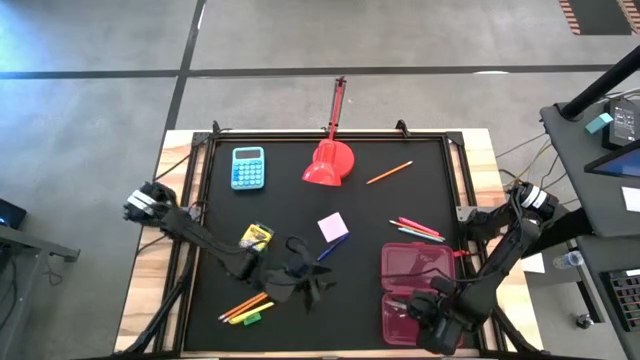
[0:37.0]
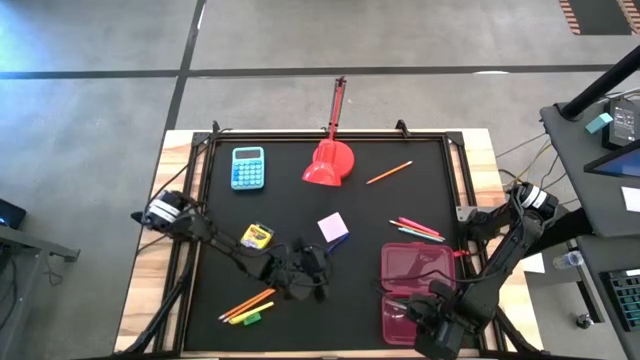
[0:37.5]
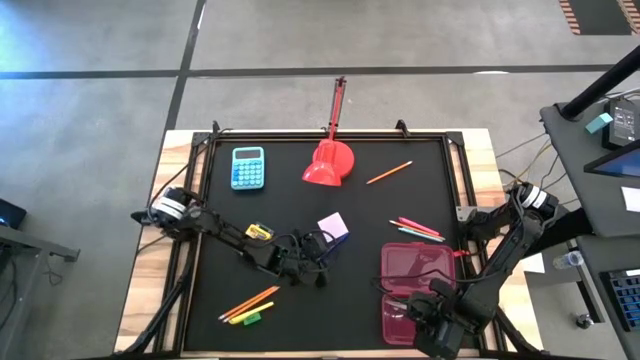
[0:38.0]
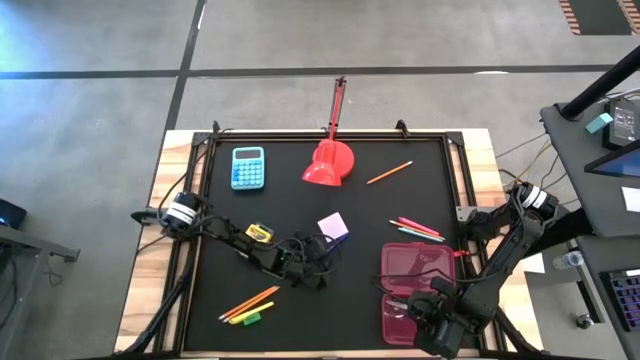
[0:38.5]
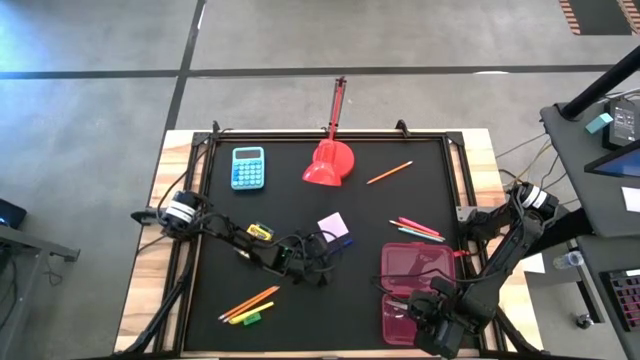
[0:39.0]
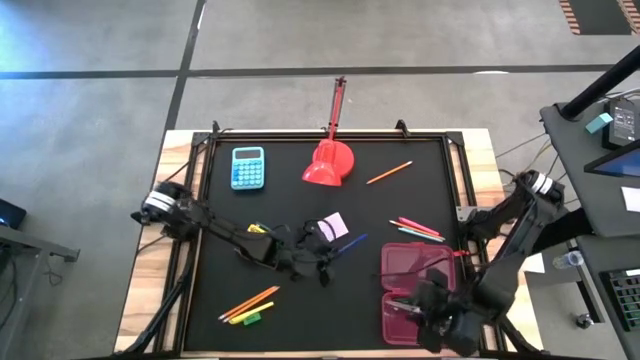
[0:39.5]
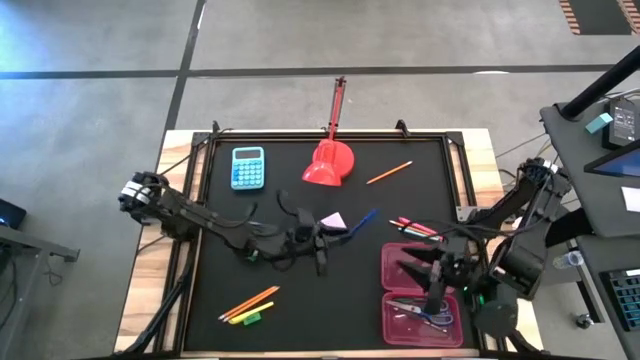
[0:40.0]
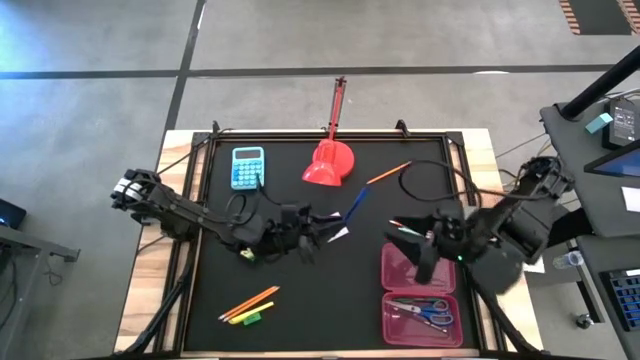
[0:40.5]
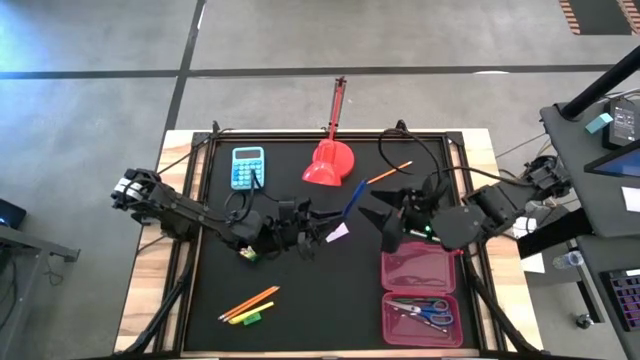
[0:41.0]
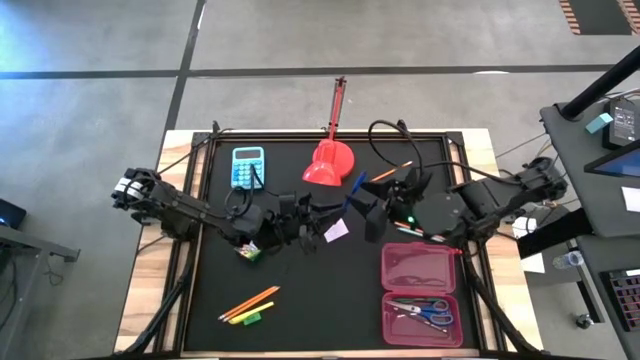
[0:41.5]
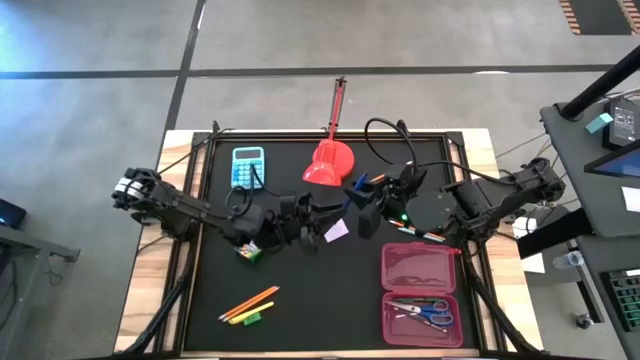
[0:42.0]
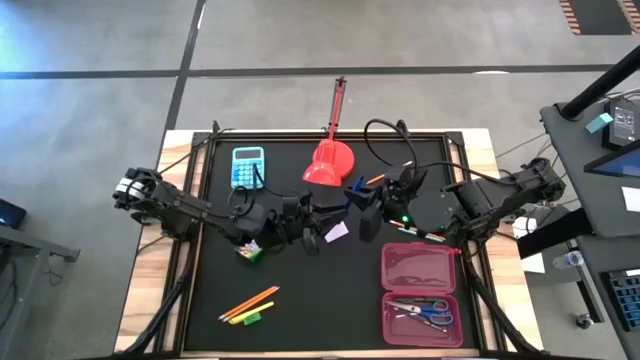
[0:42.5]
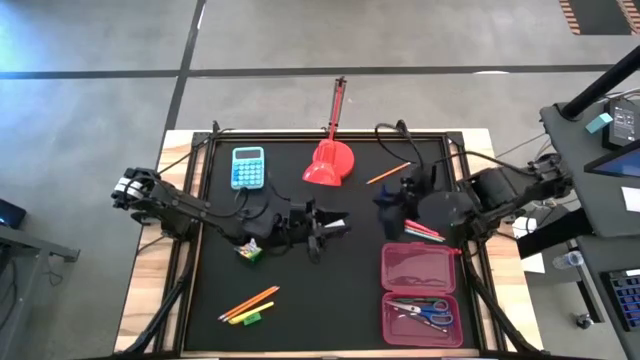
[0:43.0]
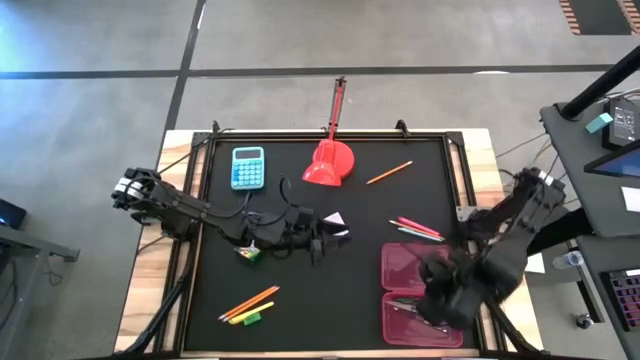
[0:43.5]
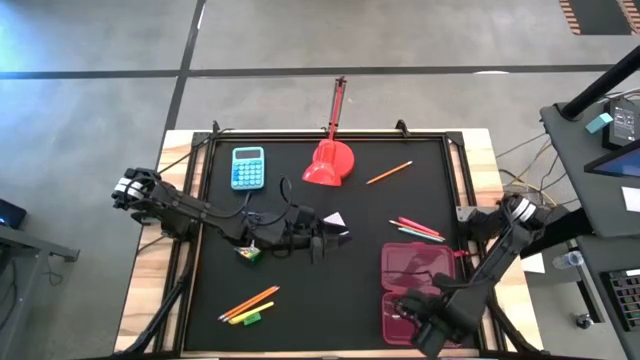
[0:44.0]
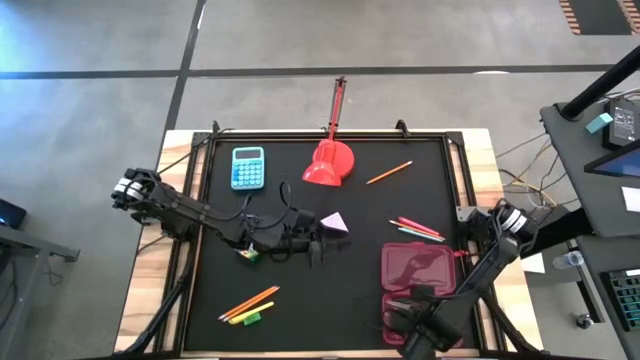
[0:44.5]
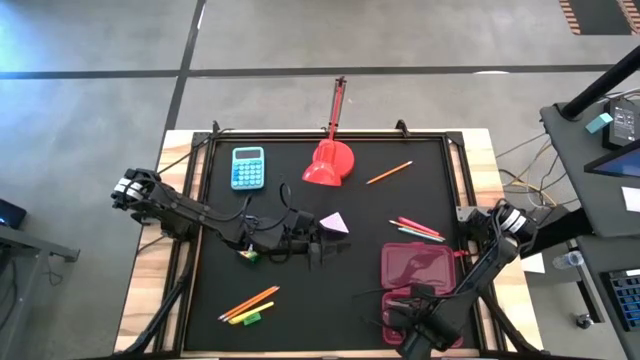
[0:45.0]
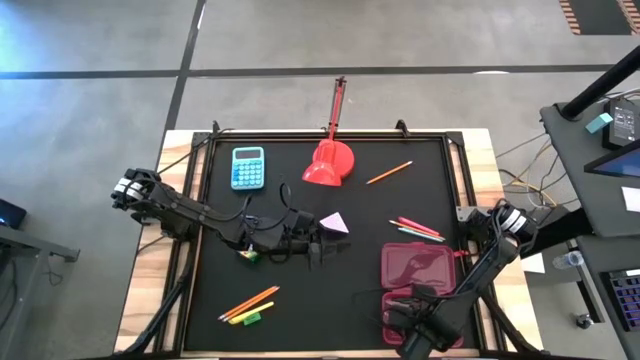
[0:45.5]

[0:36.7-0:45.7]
Task: Pack school essentials
Put the blue pen into the pink supply box

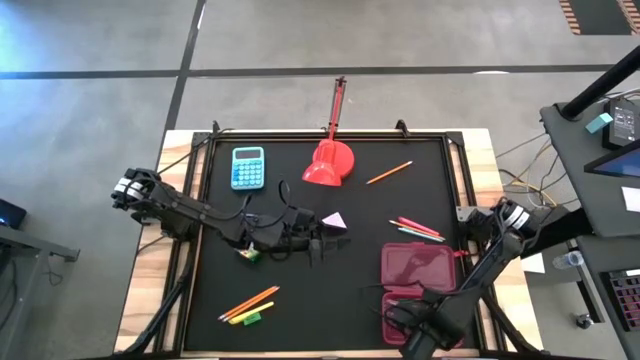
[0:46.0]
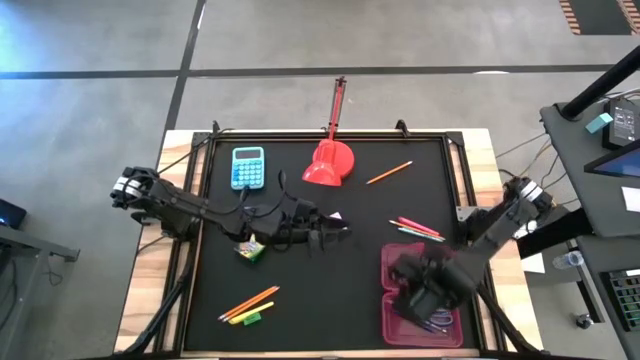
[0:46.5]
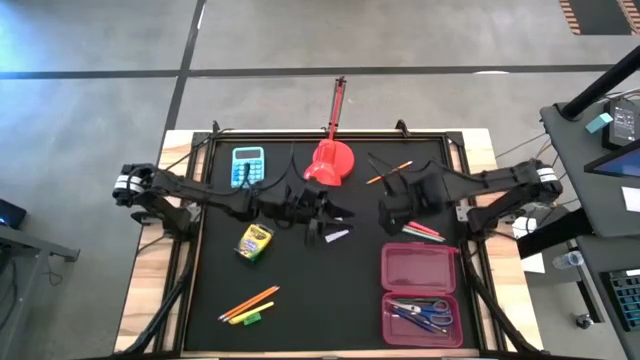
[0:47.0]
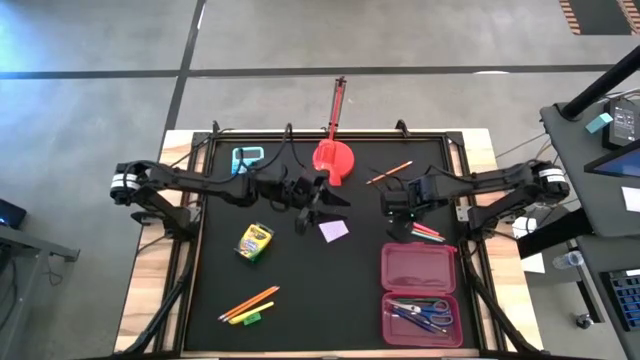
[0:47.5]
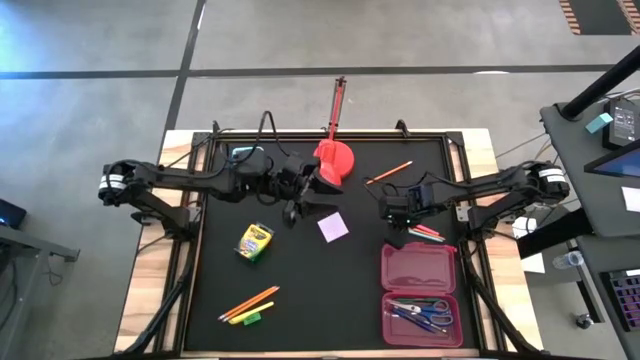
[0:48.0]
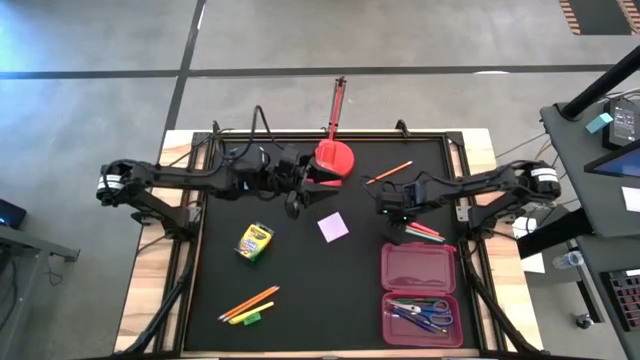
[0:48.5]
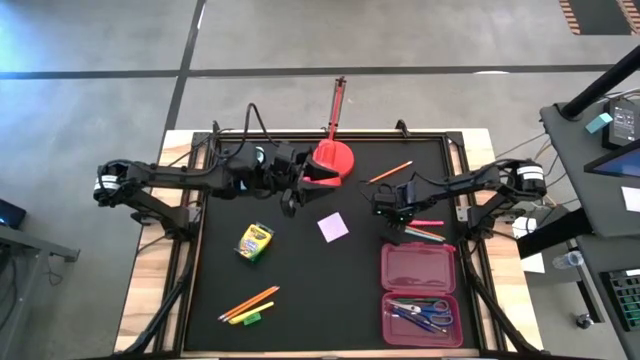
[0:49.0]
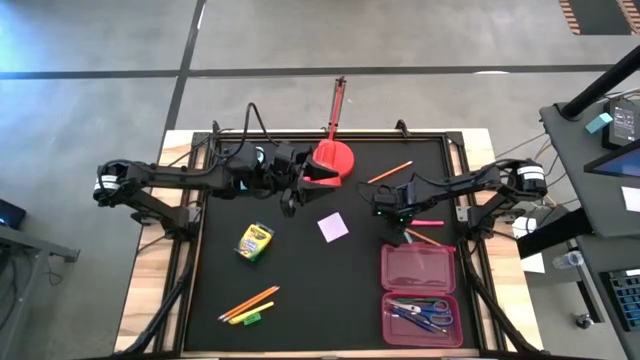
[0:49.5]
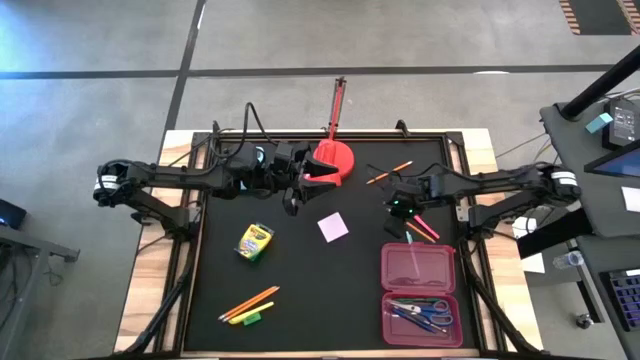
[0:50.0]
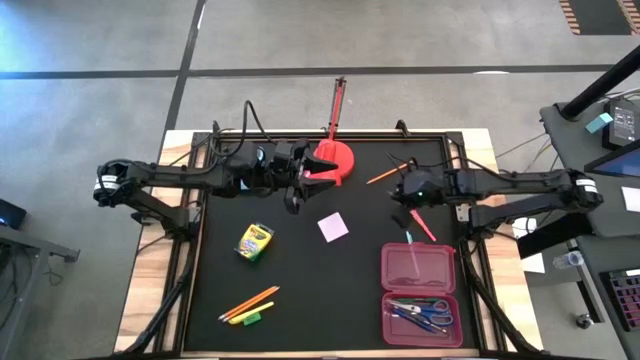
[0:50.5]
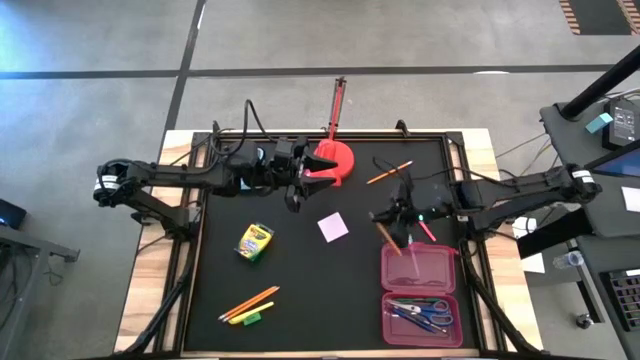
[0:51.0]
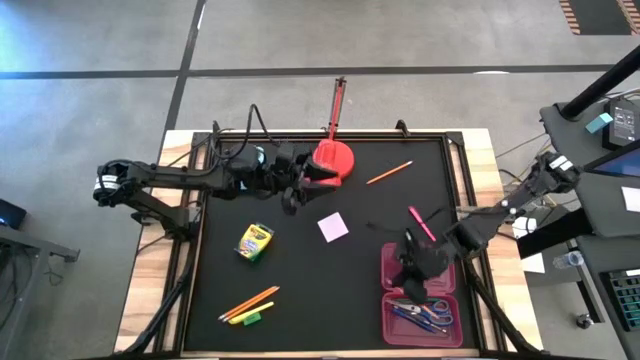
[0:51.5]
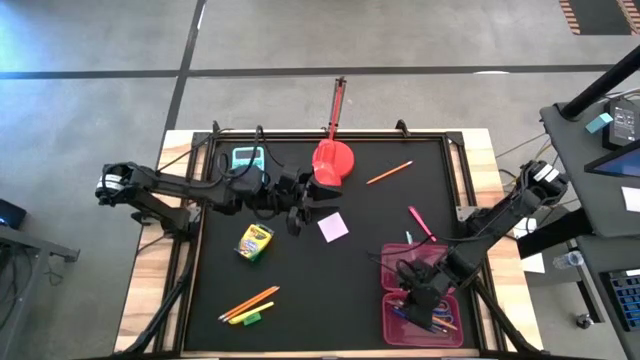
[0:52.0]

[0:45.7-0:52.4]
Put the orange pencil into the pink supply box

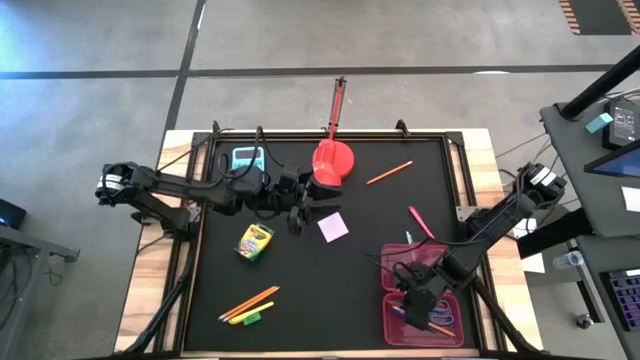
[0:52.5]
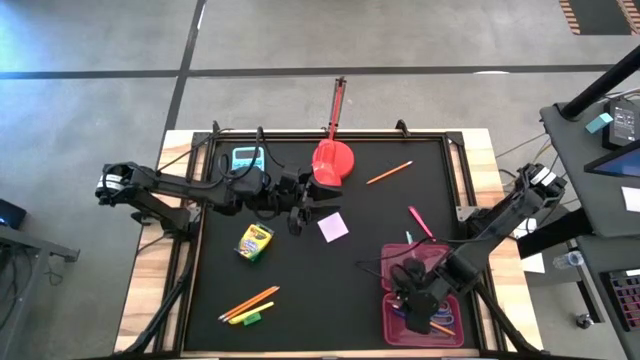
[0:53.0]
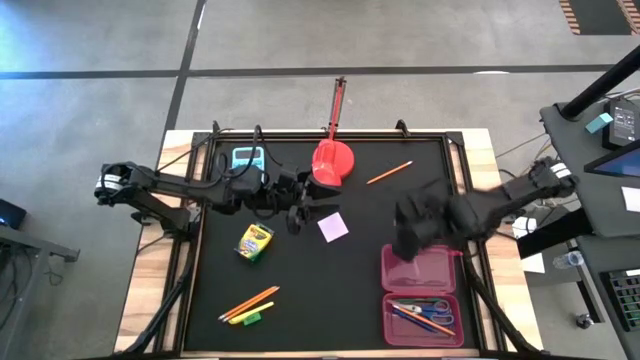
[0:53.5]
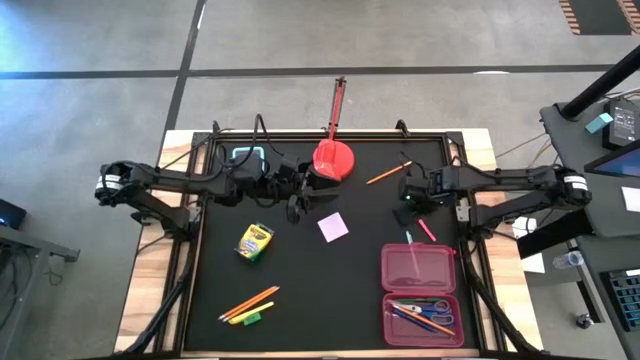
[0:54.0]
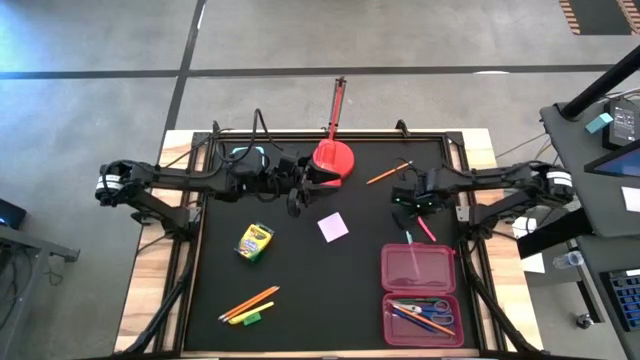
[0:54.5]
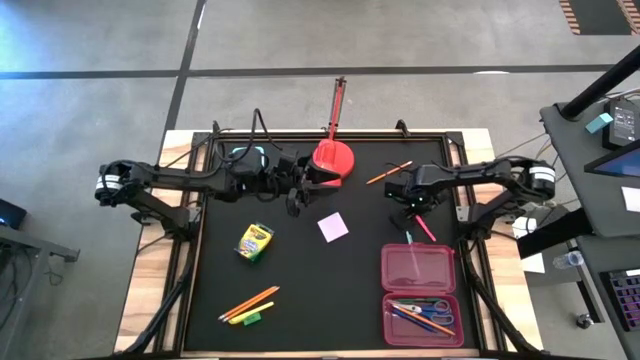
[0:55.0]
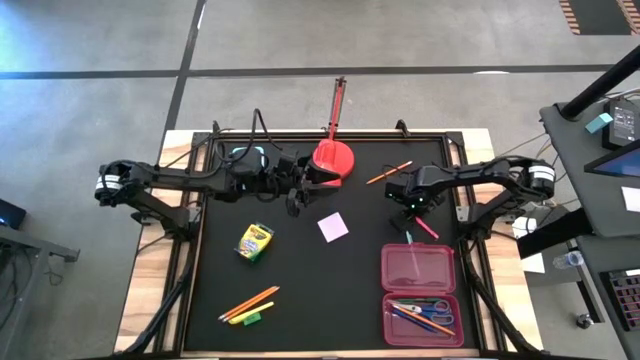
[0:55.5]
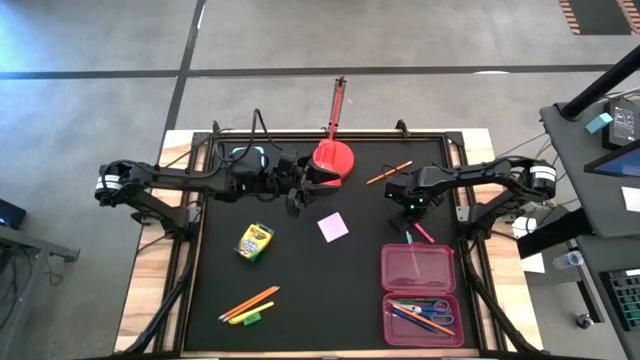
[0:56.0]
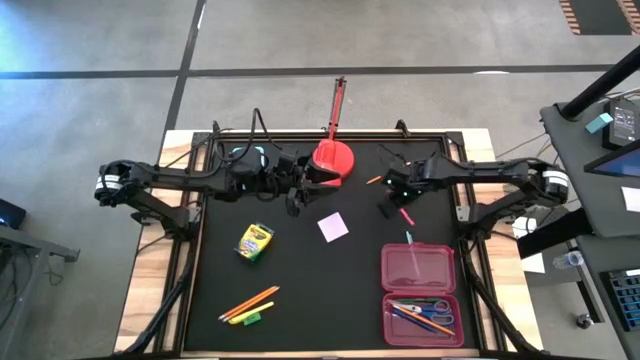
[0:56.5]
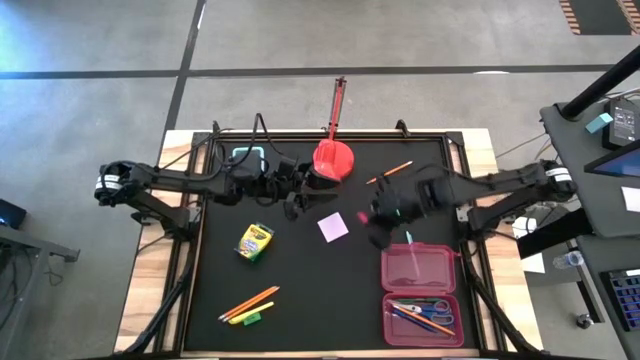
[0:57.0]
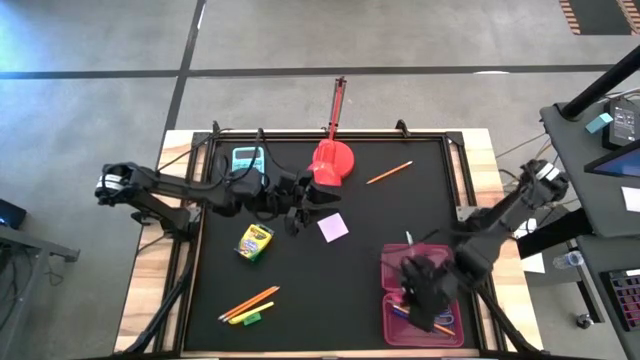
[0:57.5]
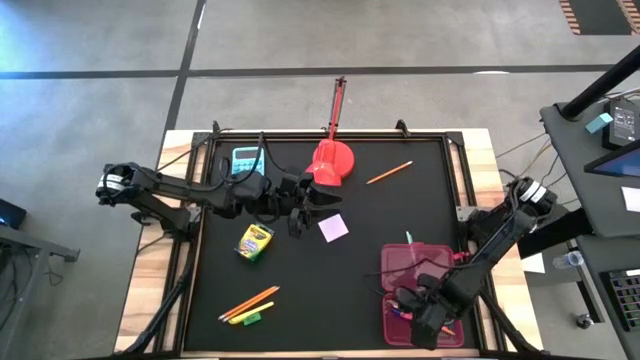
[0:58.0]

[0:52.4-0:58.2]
Put the pink pen into the pink supply box
